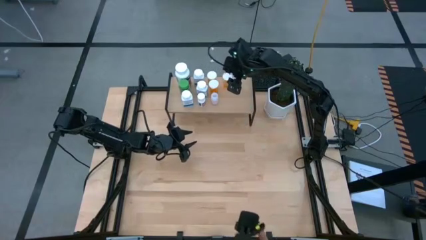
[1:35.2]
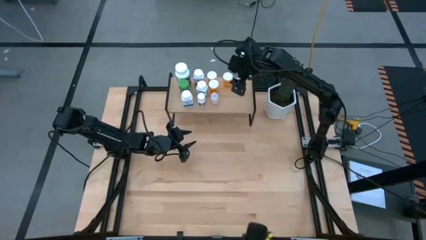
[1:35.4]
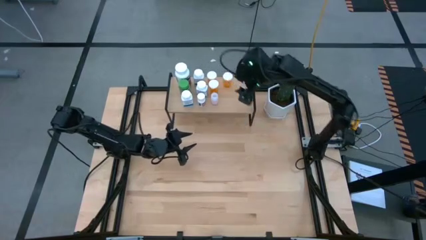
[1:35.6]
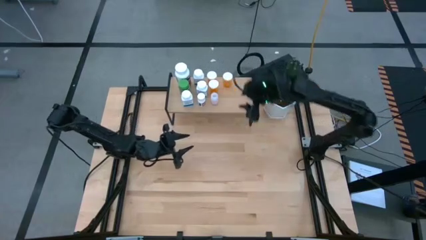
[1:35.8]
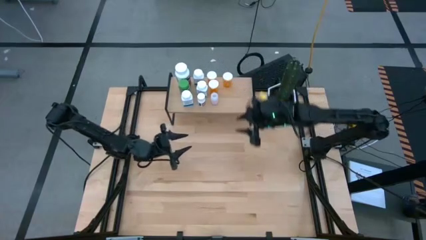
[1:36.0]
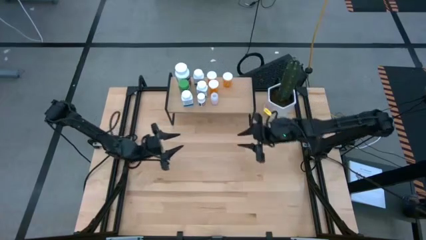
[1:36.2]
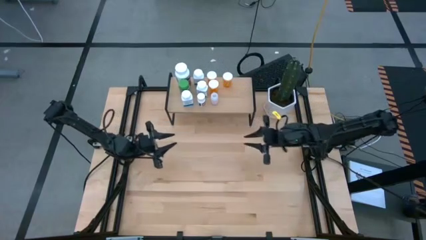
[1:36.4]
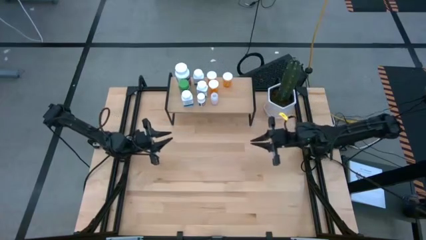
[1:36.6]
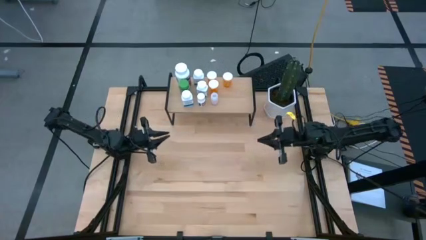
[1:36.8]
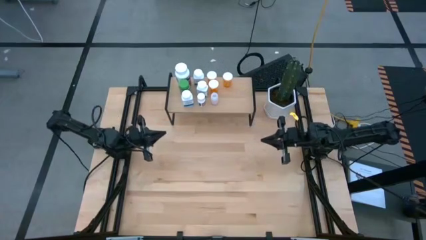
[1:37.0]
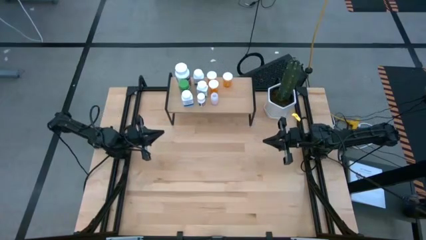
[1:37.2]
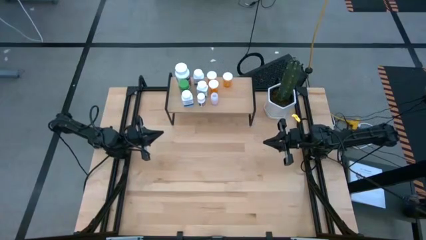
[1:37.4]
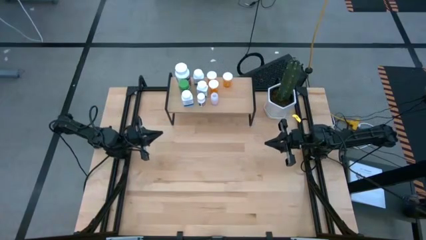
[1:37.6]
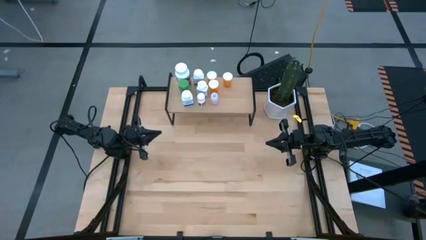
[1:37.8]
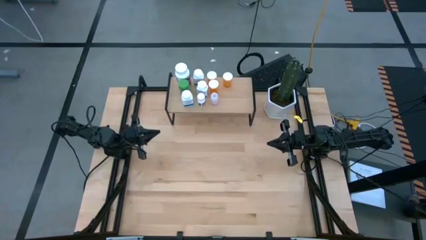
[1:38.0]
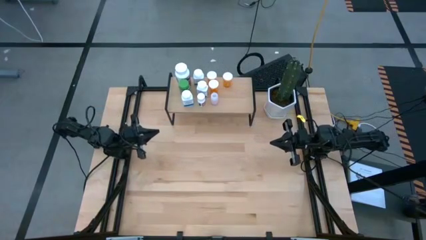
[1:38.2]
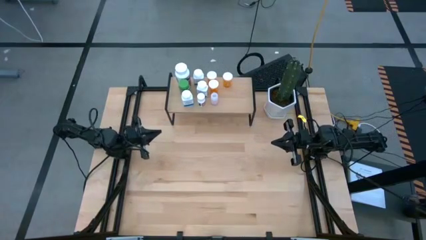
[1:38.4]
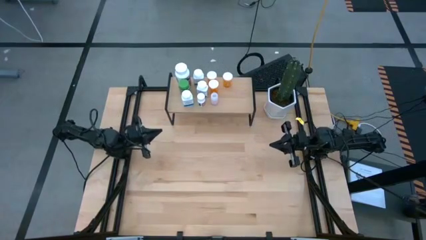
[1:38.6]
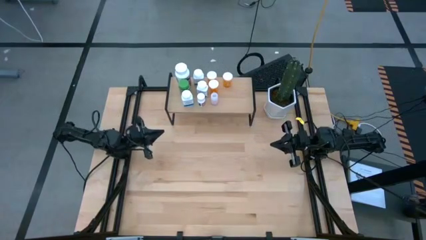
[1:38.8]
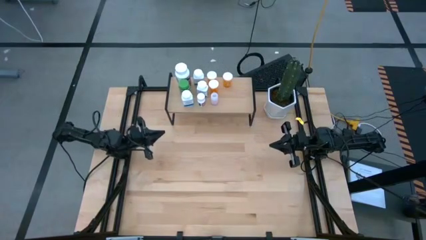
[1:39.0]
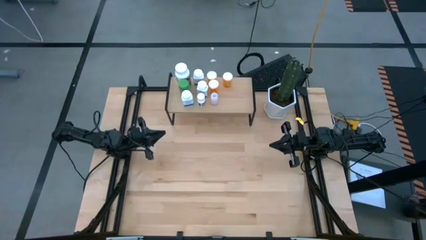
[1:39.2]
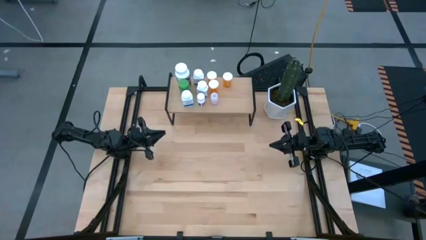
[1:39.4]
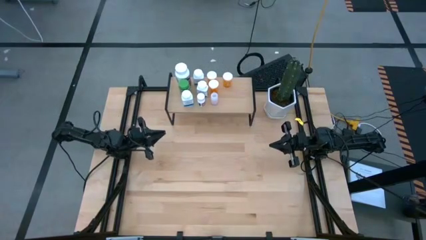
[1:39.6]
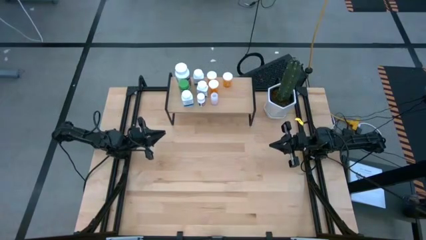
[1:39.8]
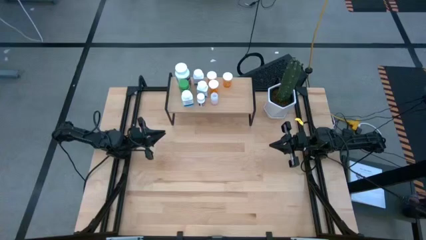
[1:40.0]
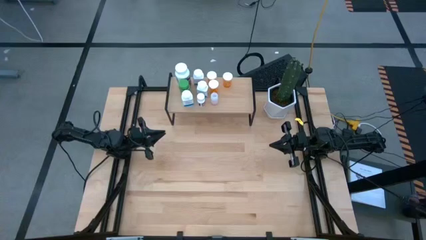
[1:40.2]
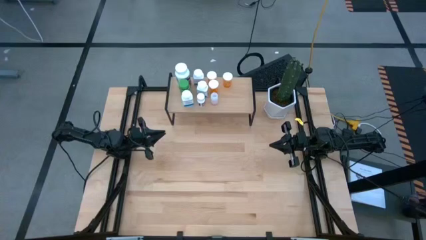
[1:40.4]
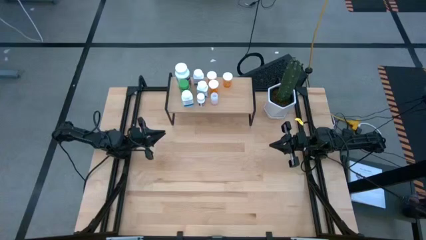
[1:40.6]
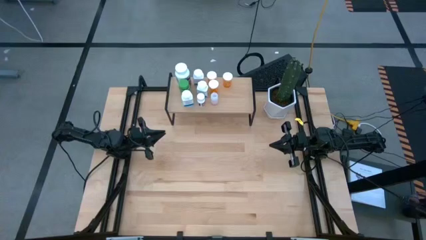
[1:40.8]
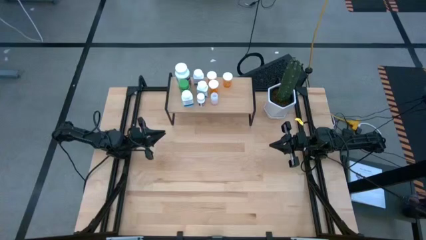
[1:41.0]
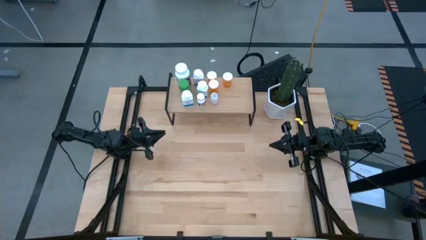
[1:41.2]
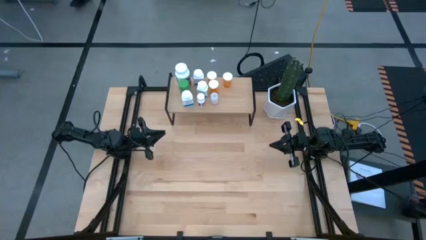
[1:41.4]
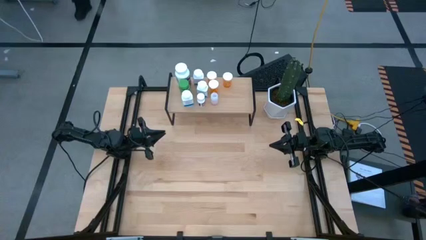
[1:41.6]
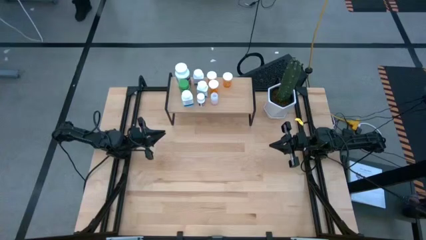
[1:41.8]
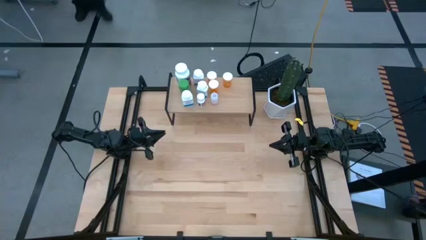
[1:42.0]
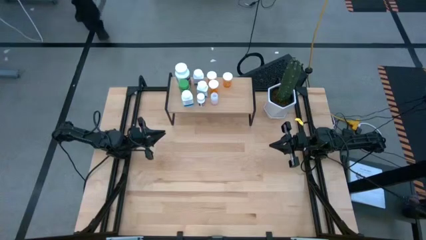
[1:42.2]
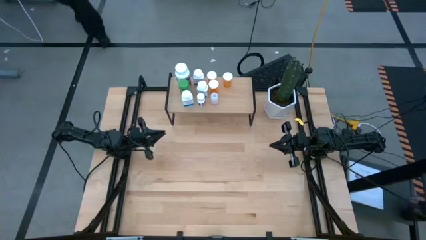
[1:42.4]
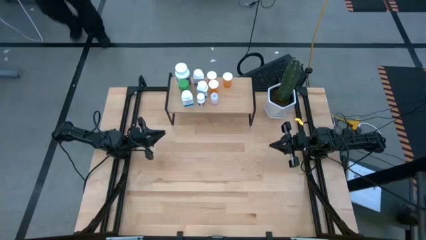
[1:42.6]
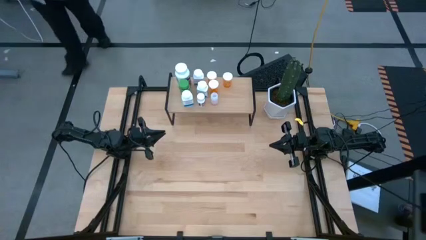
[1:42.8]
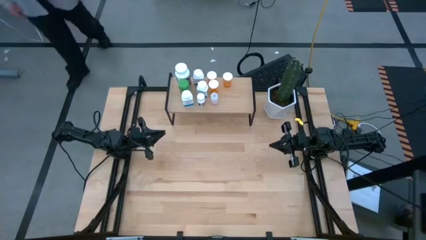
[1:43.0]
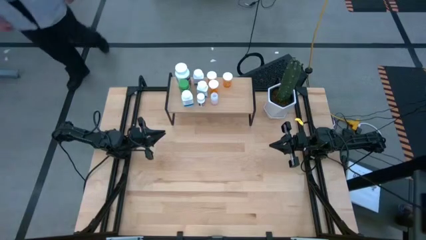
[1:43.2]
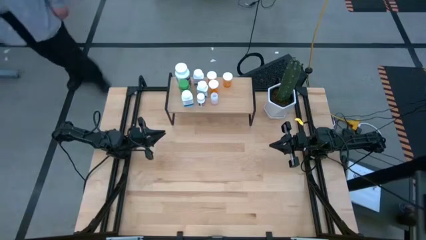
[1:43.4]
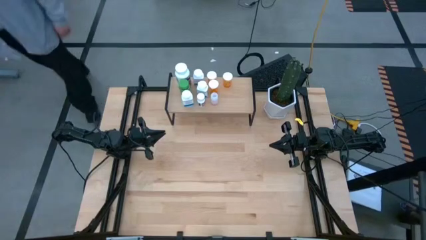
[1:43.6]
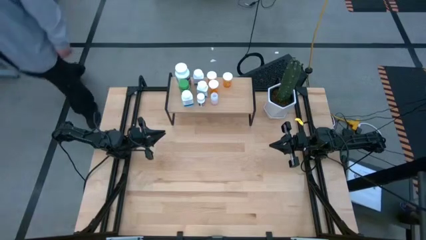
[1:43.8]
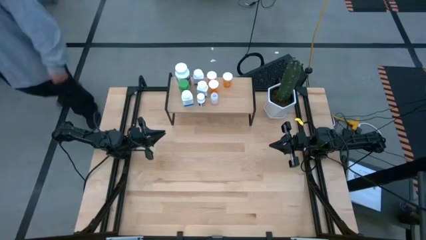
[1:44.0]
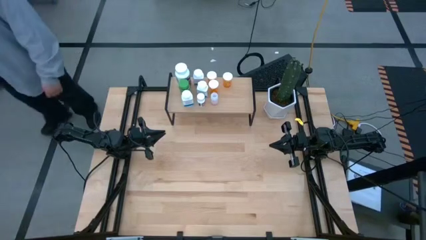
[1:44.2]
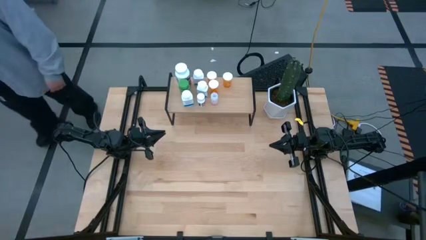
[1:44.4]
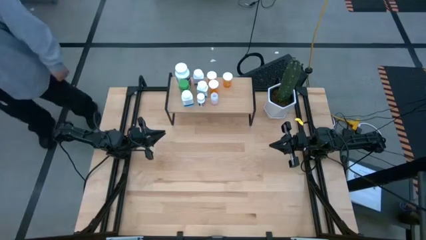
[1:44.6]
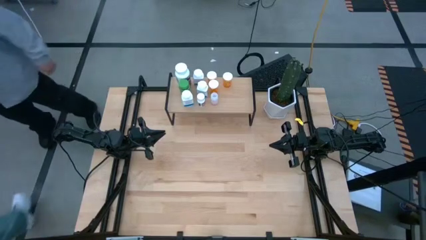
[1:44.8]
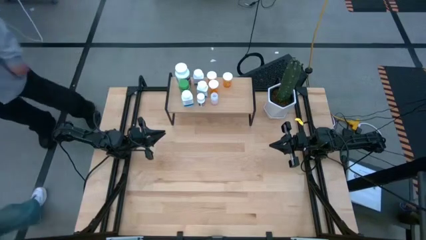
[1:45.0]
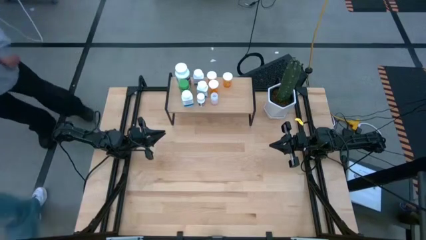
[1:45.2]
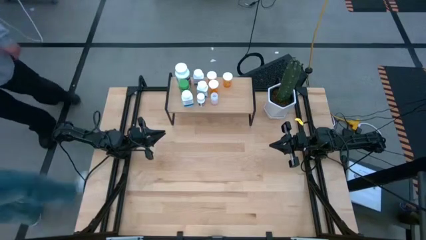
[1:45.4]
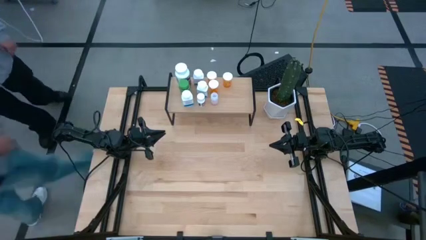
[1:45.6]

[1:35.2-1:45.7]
Task: Pick and place medicine bottles onto shelf by color
Return to Home Position
